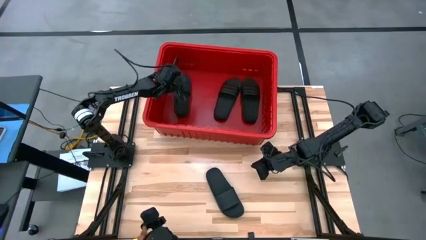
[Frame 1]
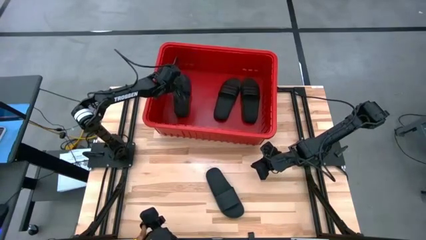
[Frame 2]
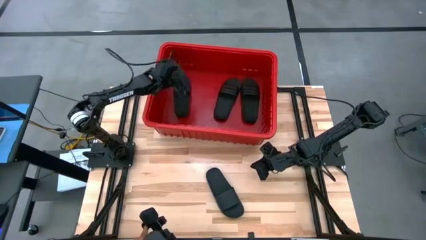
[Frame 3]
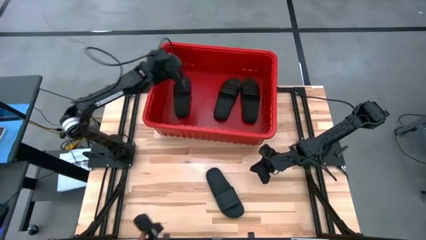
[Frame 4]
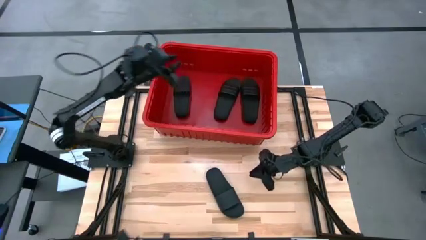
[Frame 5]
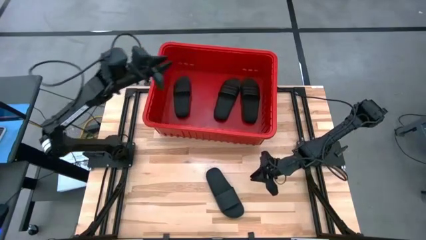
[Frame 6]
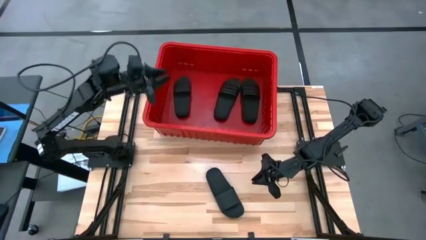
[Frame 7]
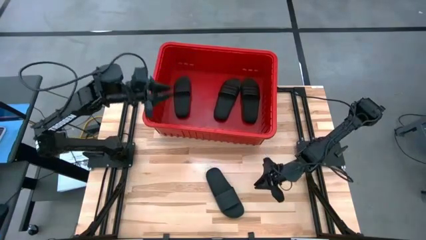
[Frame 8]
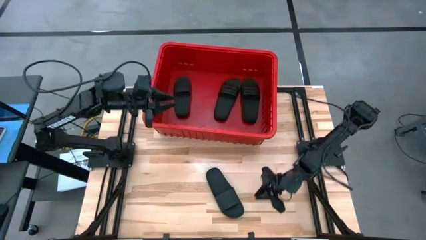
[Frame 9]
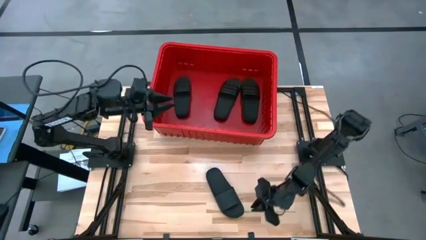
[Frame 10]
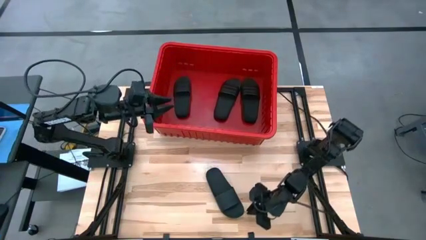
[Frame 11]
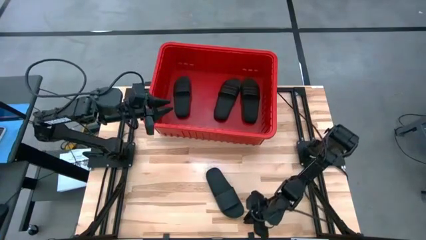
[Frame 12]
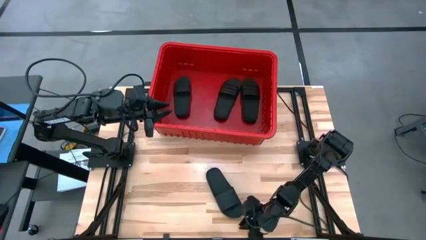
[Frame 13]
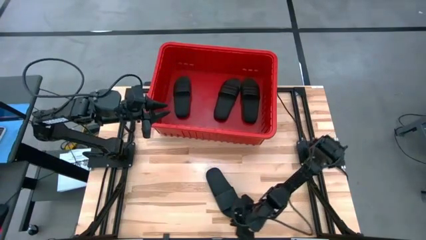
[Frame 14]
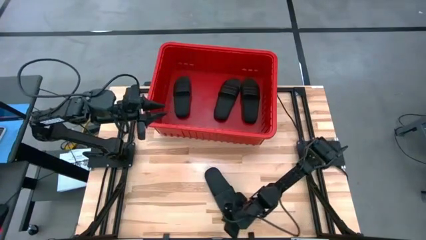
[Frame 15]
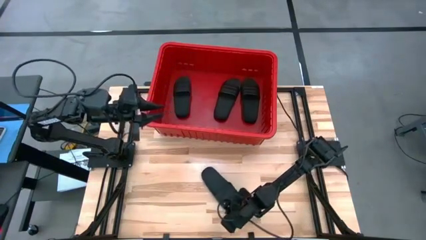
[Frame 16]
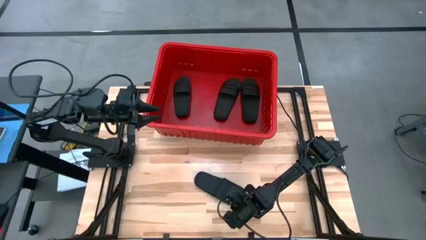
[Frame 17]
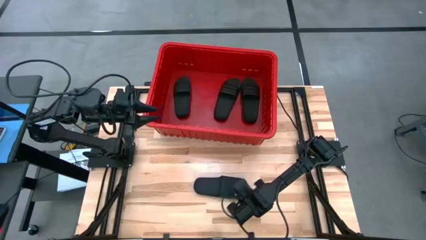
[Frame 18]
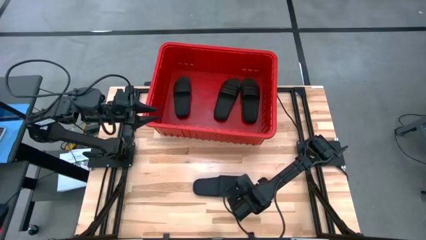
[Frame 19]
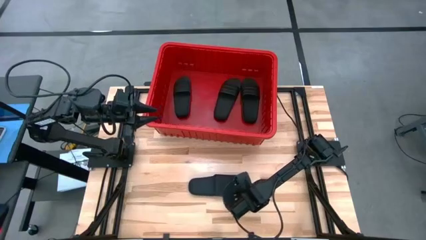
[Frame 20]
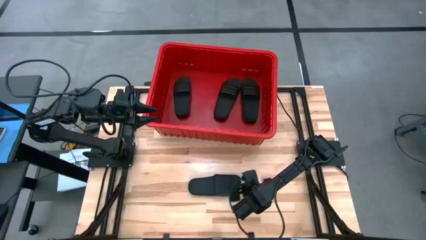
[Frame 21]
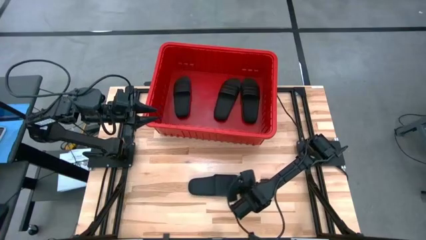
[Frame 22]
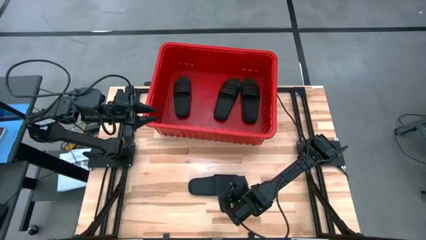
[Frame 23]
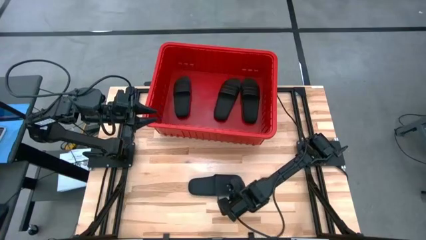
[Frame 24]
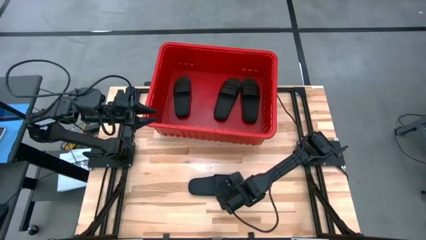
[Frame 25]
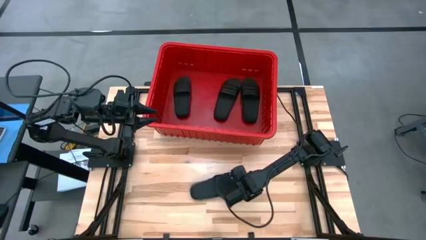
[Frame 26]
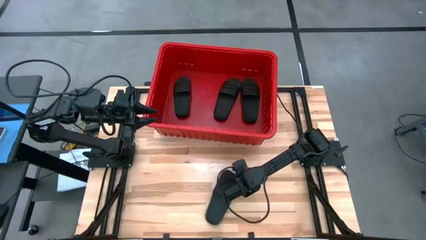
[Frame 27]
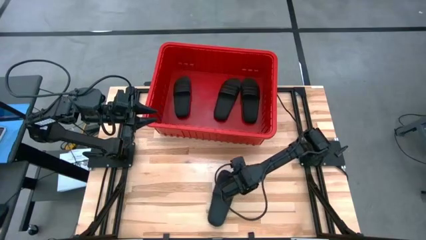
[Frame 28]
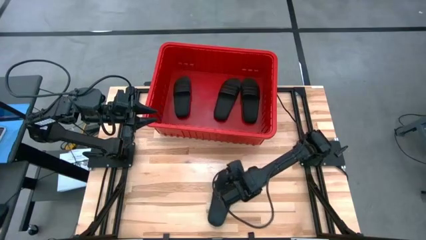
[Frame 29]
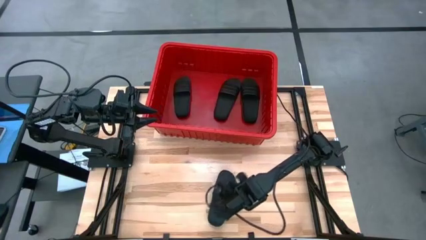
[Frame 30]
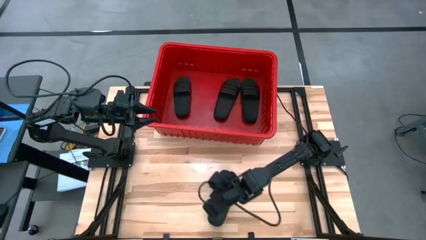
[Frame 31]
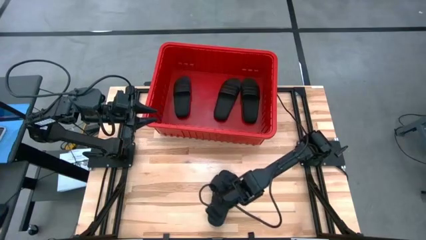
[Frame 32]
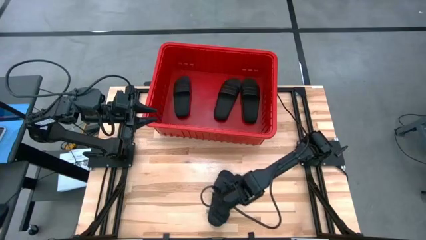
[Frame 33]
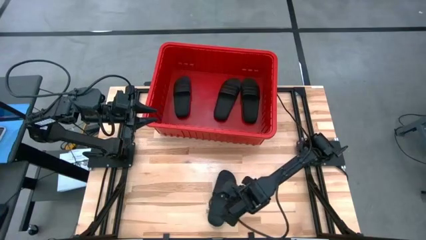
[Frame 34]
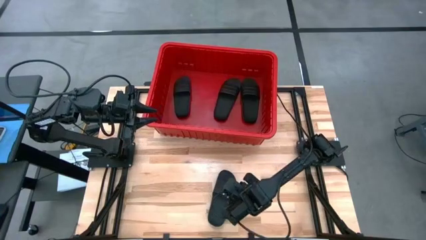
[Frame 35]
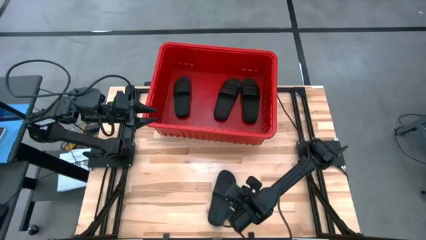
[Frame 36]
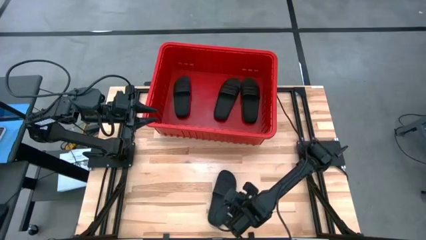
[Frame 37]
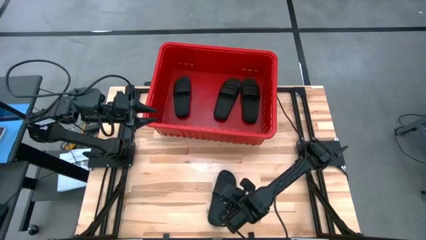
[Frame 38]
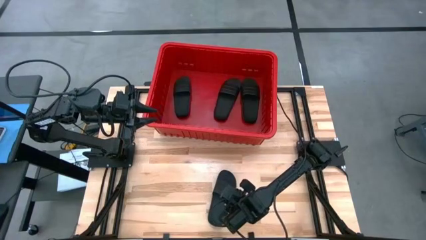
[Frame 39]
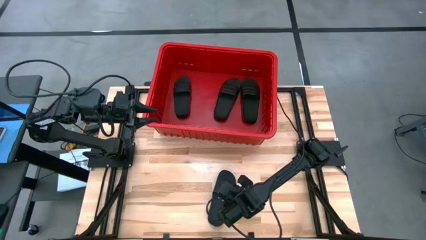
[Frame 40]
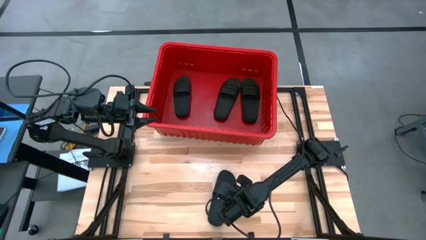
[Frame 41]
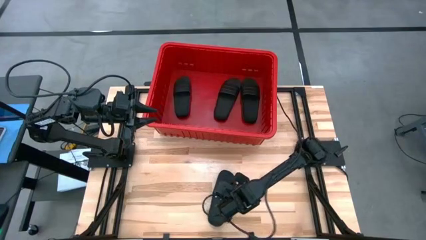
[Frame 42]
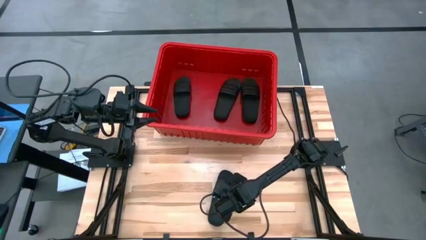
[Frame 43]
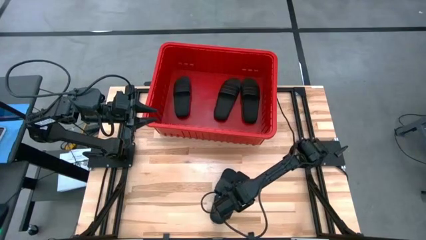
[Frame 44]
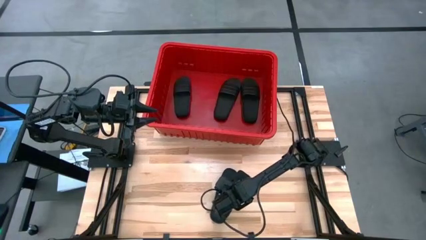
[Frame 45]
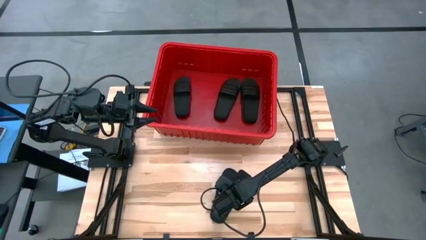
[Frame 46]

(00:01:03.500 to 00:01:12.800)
Task: Pick and place slides into bin
Put the black slide into the red bin

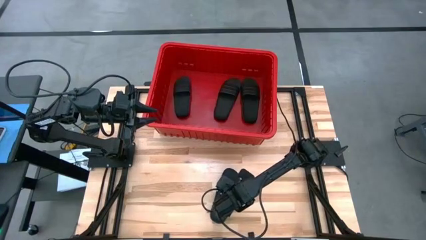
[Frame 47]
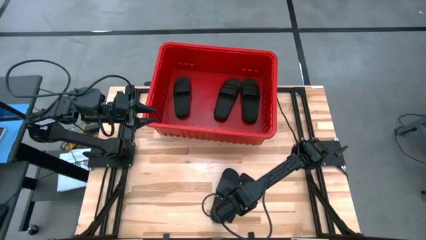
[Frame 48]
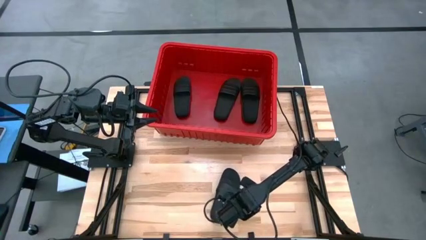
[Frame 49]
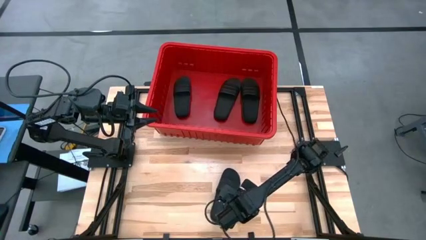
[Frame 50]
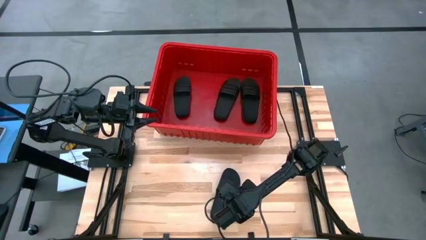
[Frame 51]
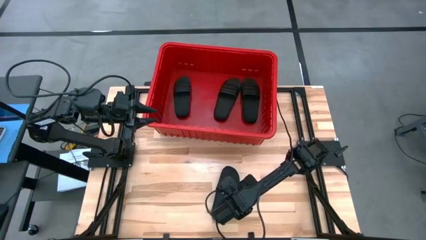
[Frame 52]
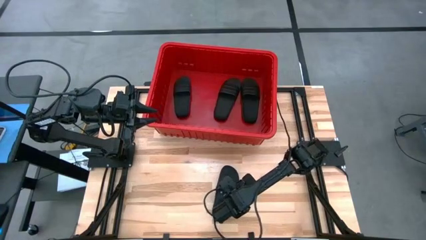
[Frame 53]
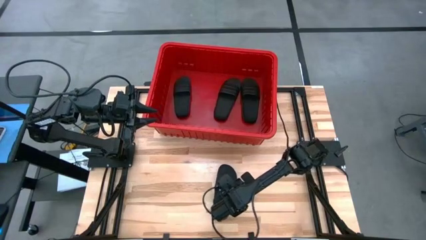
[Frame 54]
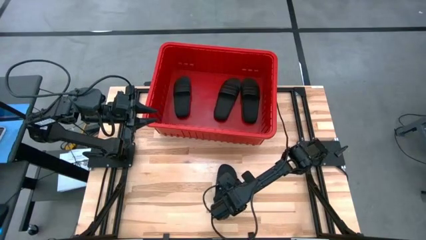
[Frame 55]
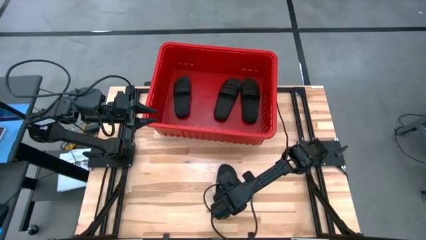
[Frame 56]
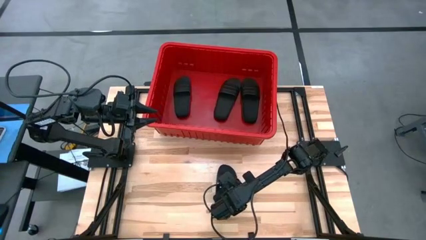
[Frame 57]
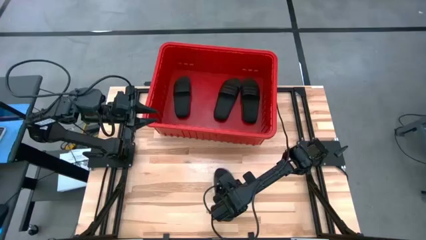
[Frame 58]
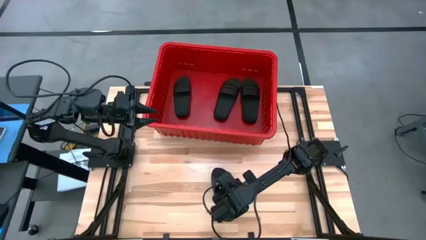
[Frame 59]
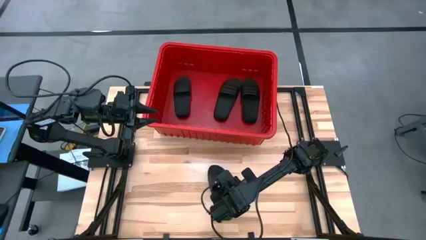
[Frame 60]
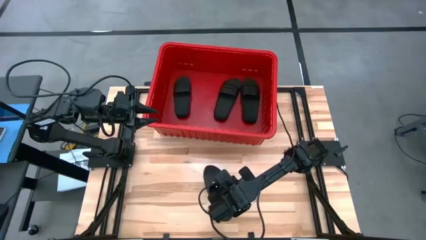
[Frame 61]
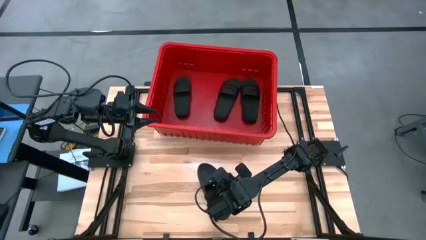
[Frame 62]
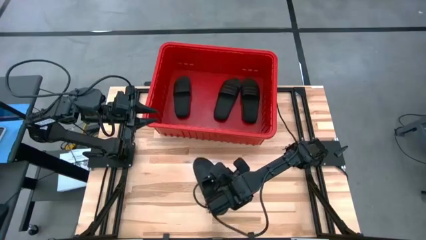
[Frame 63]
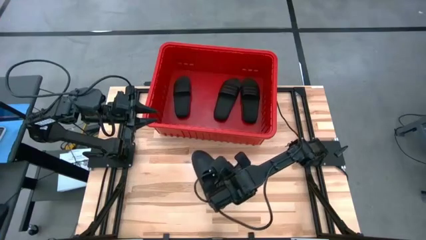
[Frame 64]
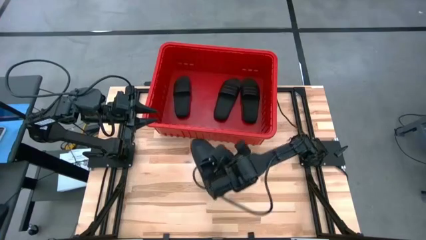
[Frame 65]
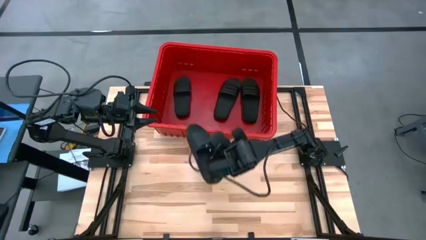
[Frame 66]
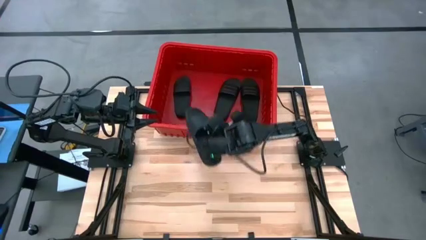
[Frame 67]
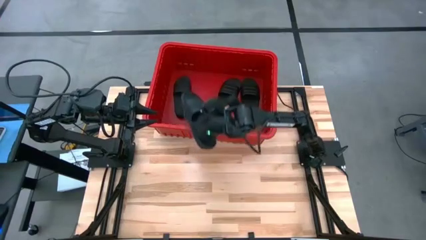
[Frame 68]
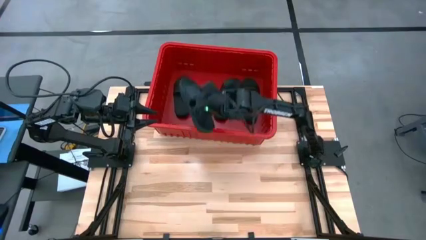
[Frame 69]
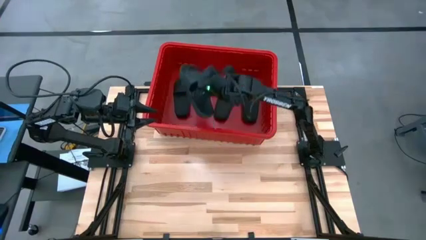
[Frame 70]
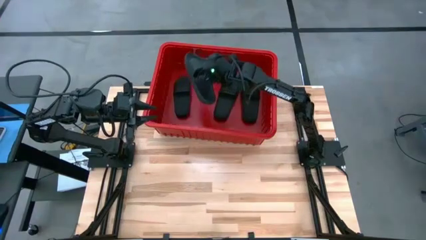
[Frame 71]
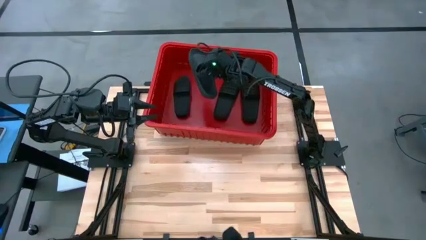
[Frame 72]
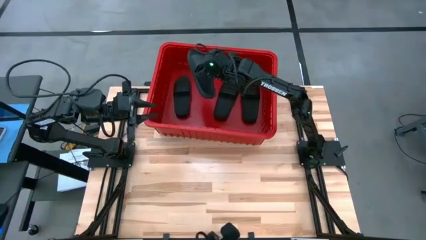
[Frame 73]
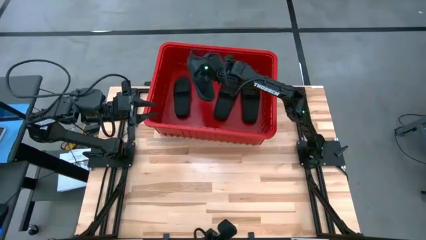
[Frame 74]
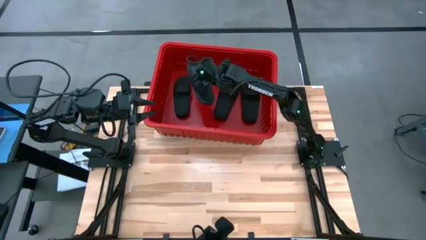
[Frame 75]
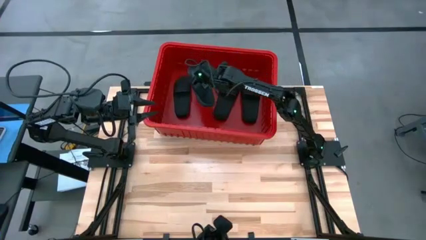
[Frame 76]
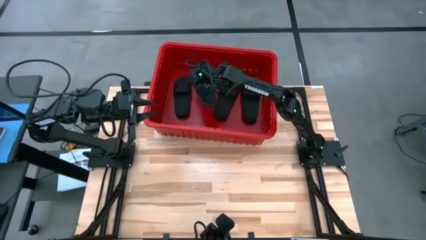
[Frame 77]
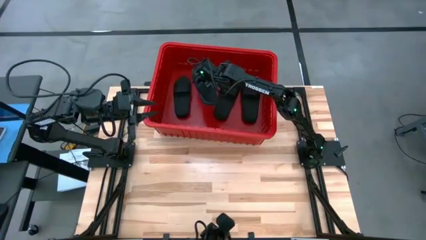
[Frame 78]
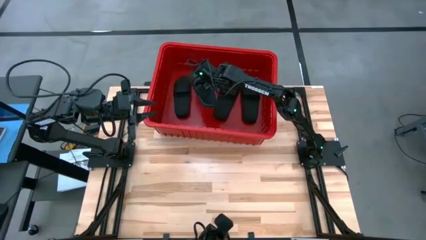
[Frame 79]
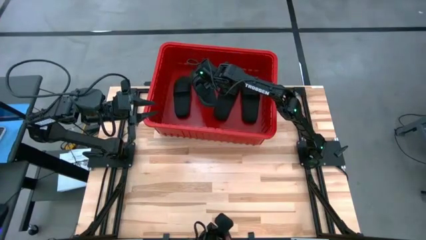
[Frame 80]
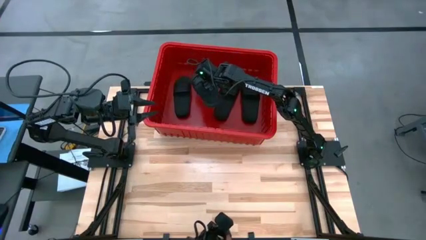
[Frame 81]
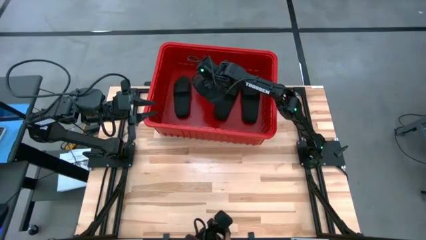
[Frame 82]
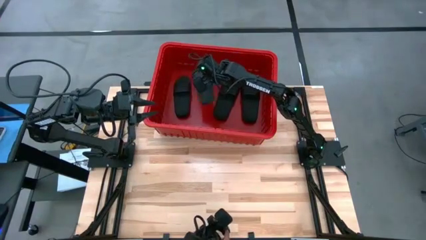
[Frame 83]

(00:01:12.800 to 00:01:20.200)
Put the black slide into the red bin

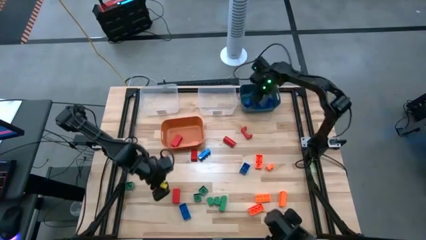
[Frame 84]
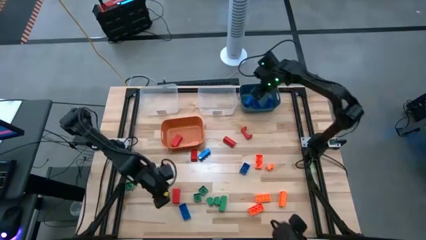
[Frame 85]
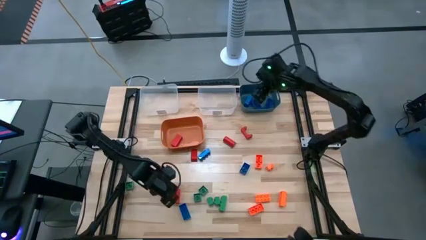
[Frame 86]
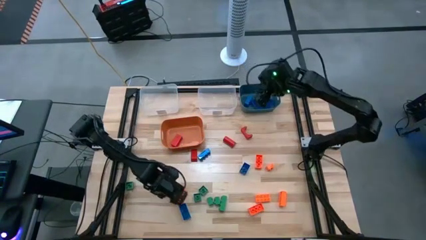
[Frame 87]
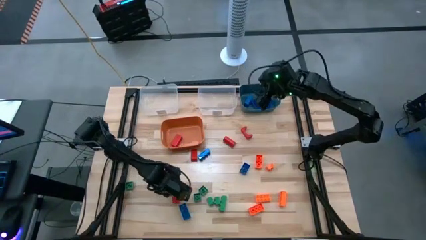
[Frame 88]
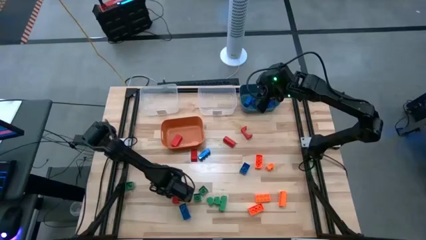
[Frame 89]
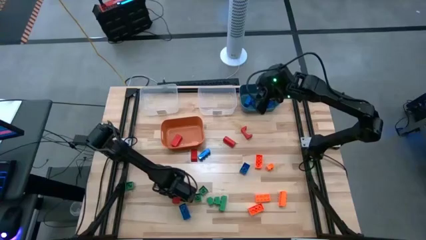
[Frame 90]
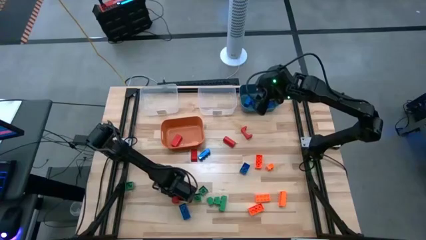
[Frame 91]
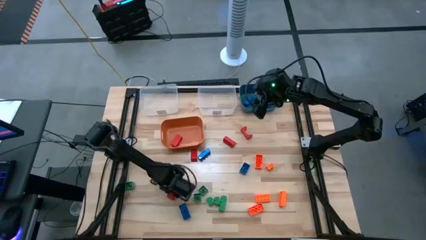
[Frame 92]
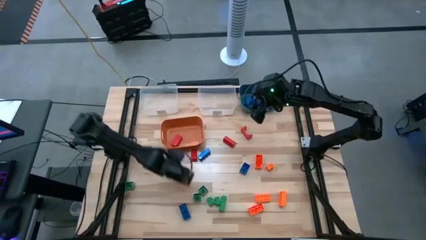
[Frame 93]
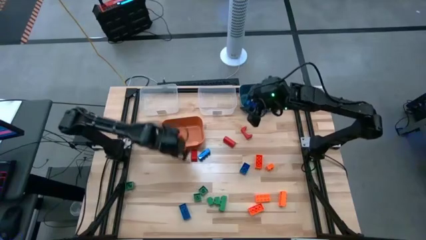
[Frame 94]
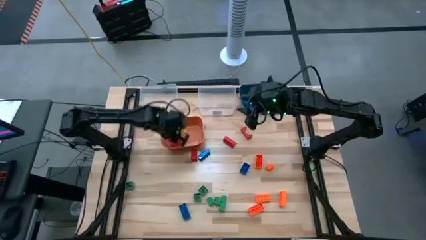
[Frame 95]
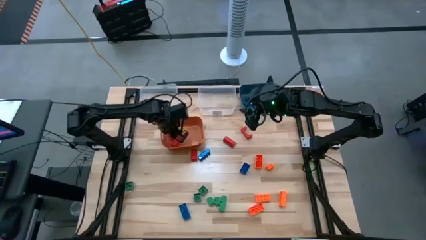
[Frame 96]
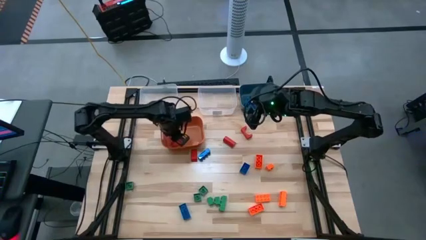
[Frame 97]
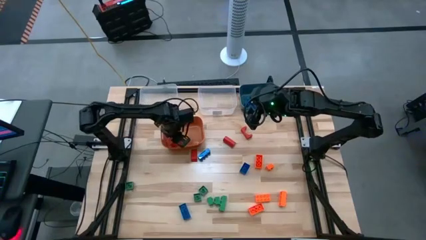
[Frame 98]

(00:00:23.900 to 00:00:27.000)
Task: Sort blocks
Put the red block into the orange bin
